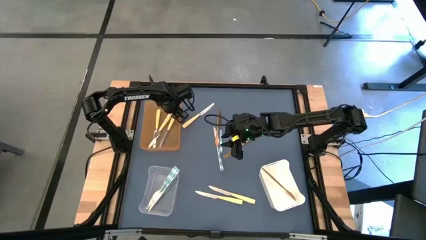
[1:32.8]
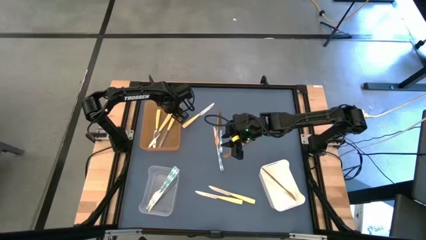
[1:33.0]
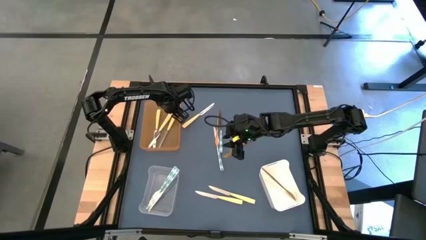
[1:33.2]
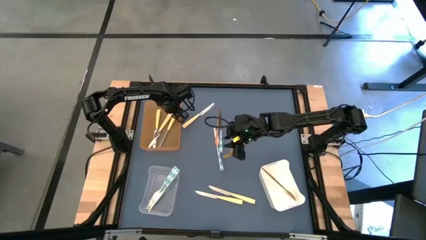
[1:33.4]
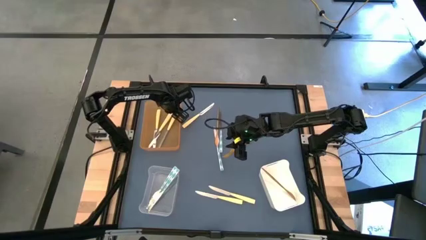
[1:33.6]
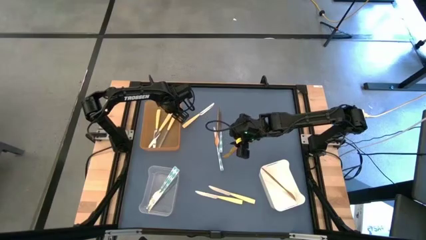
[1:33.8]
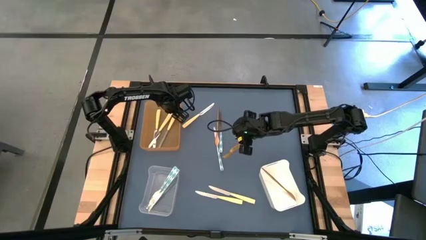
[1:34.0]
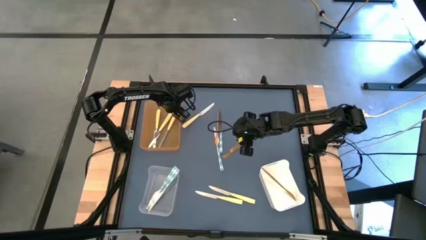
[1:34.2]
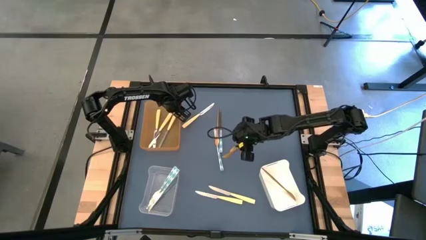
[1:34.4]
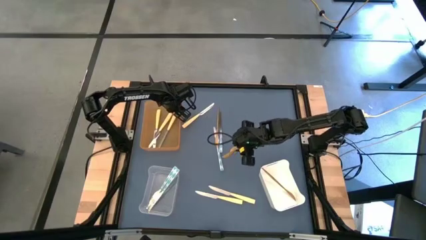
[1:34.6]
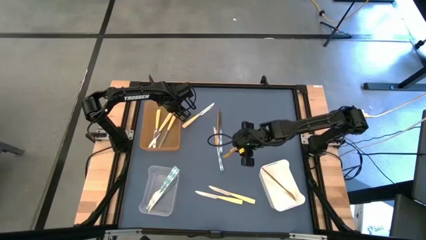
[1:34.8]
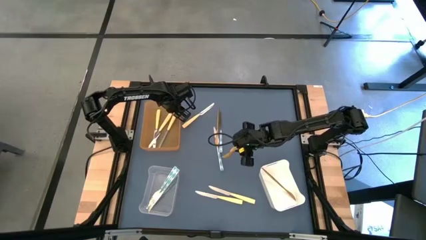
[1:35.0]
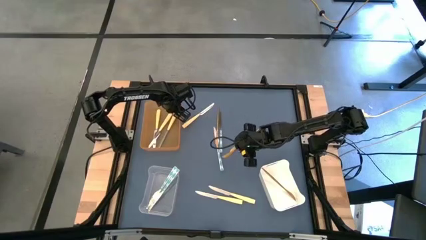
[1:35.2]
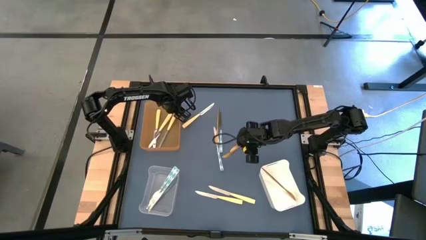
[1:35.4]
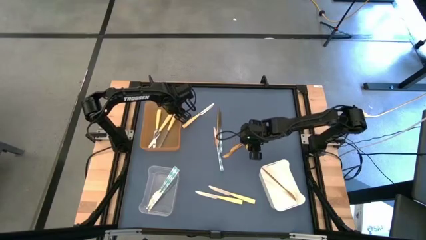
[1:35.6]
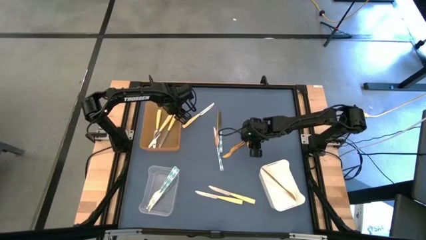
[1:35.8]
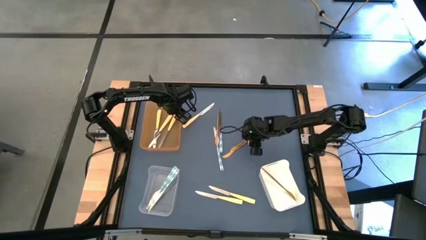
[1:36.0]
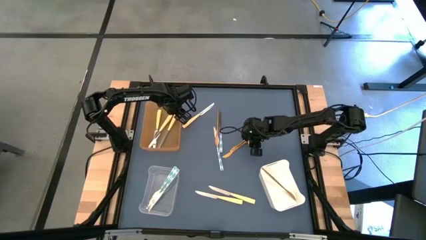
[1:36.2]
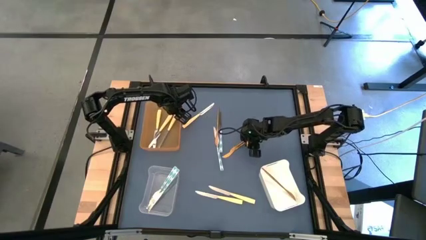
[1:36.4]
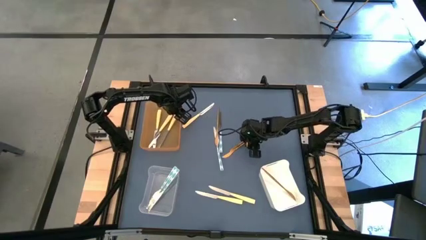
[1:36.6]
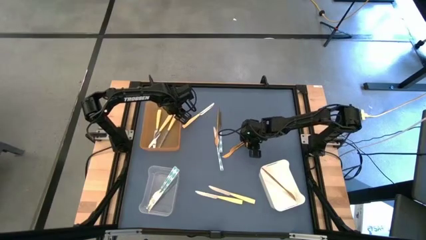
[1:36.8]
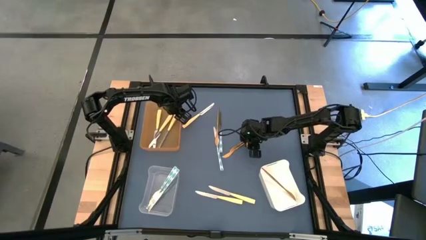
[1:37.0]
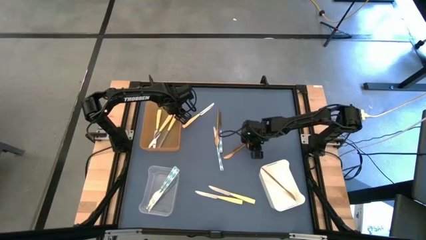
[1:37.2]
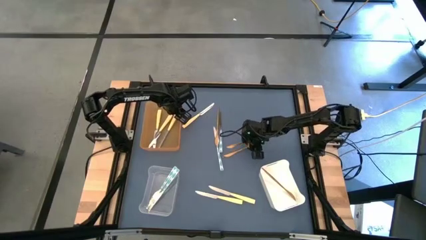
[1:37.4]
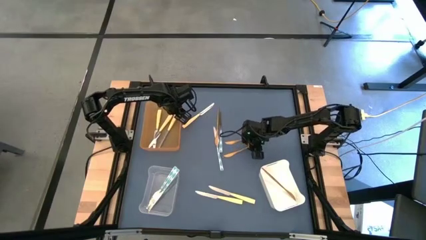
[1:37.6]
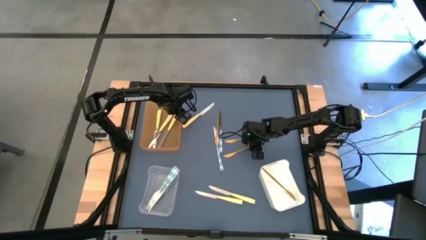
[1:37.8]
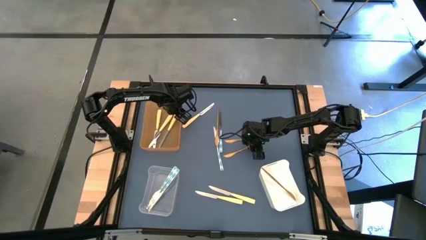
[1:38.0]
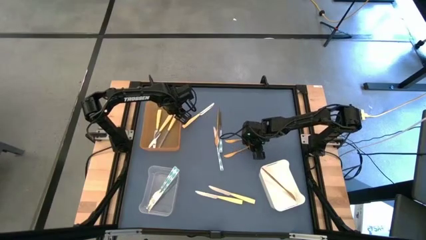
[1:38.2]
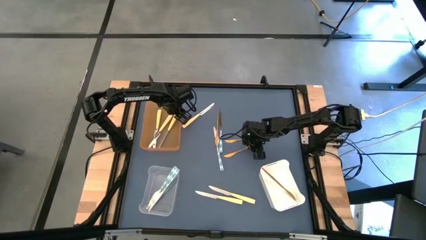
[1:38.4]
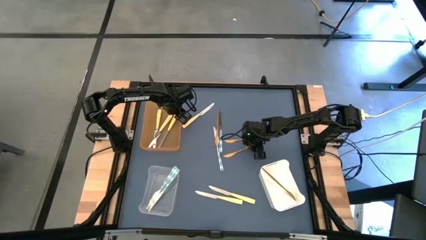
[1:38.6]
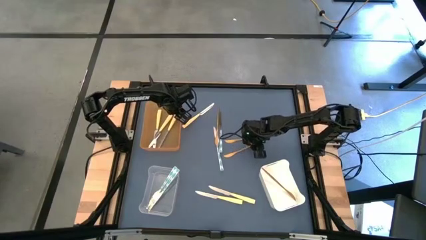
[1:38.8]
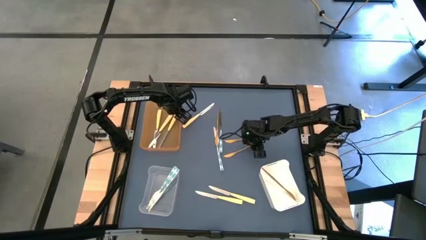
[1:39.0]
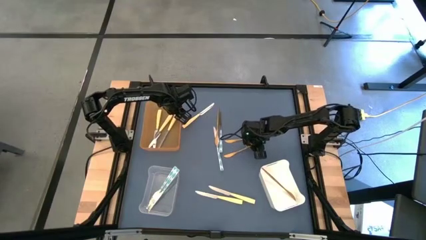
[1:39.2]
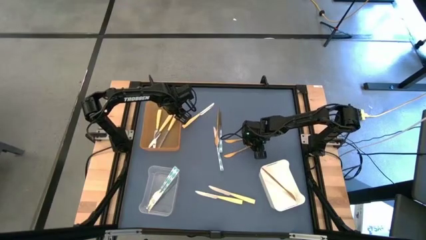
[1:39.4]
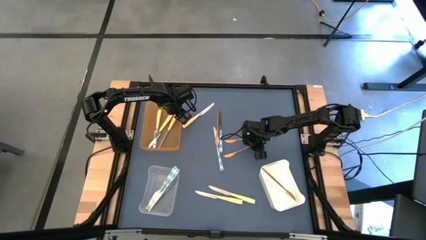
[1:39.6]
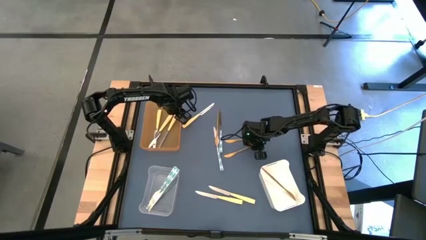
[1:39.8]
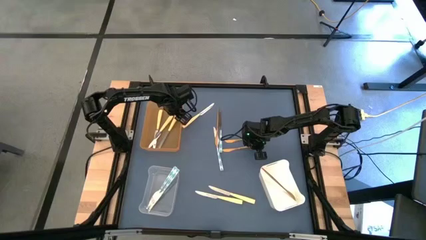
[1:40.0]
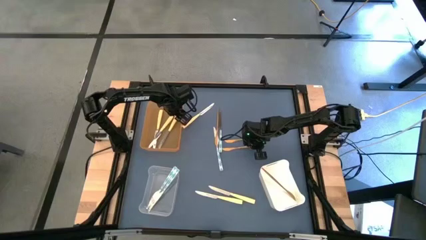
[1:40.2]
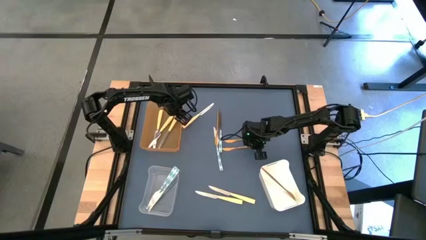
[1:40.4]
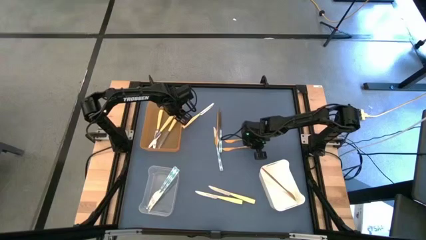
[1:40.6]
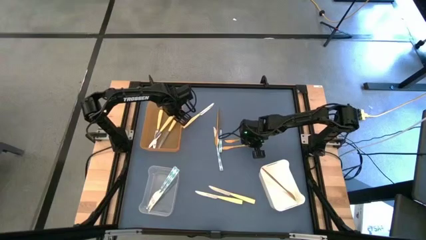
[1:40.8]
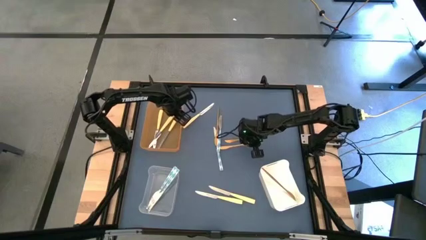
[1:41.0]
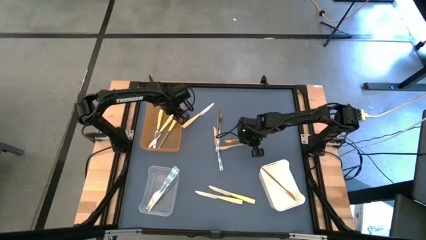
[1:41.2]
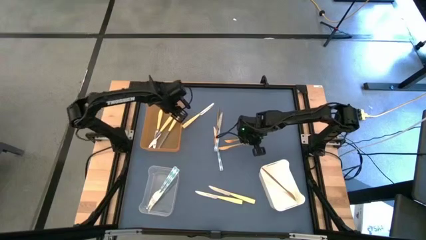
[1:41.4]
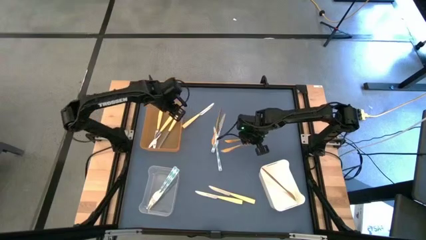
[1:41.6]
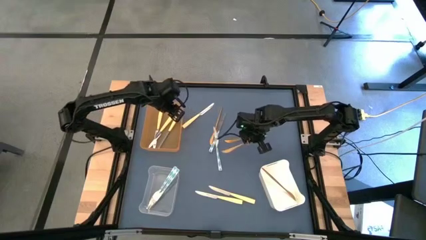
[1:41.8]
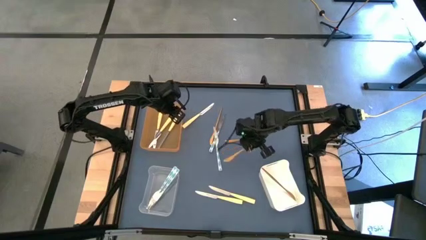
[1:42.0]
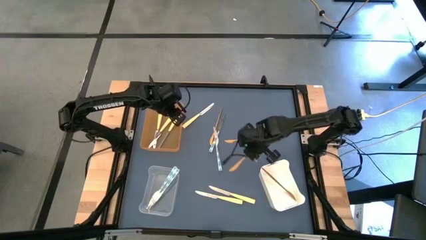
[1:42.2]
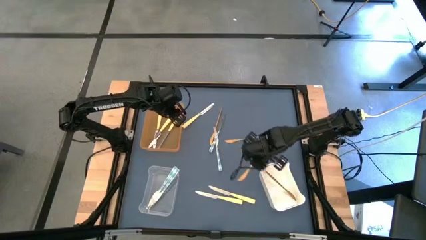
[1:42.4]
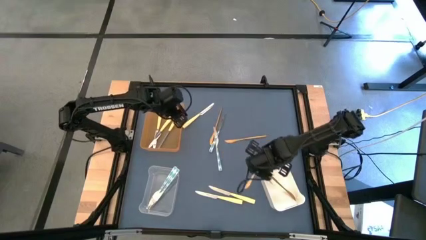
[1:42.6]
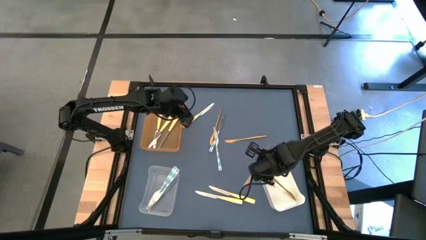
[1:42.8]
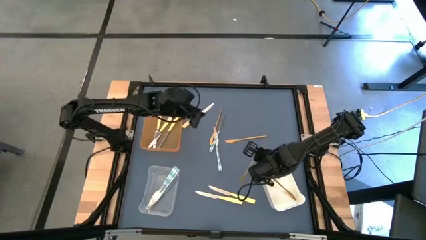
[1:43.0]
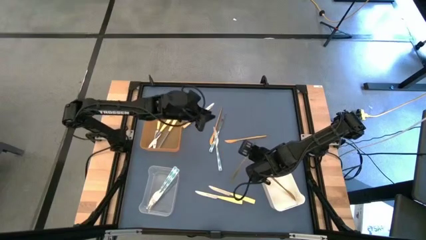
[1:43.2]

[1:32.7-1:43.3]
Task: Sort silverware by color (type)
Put the gold knife into the white bin

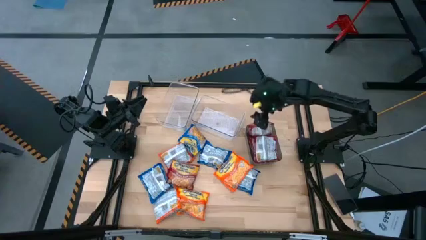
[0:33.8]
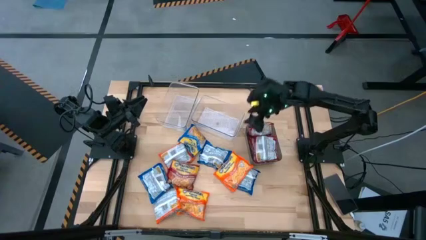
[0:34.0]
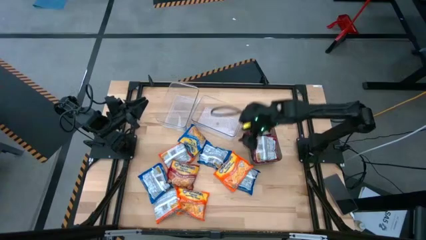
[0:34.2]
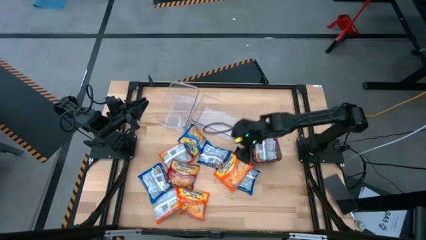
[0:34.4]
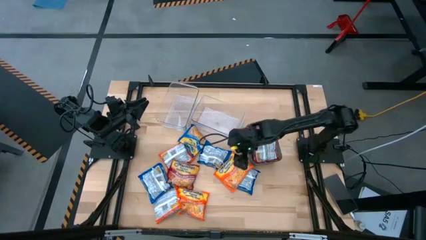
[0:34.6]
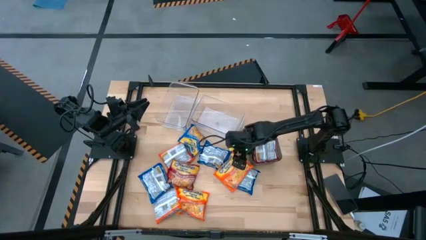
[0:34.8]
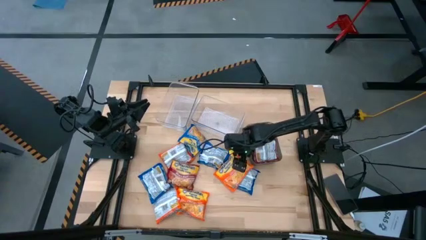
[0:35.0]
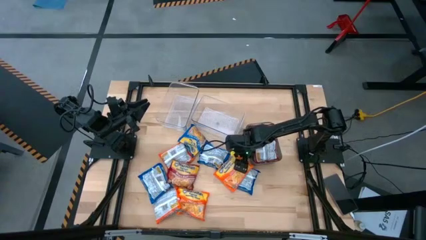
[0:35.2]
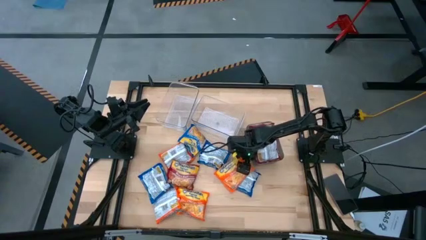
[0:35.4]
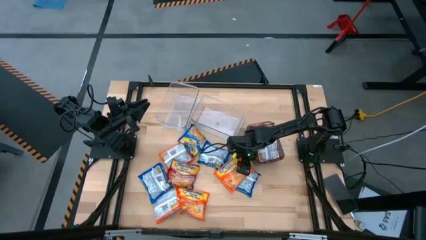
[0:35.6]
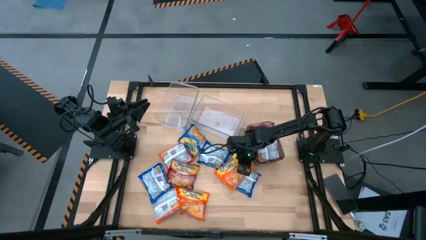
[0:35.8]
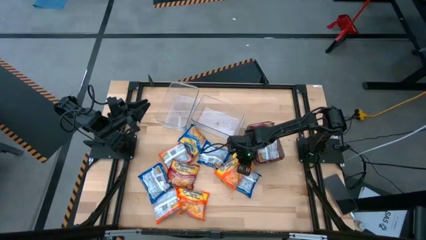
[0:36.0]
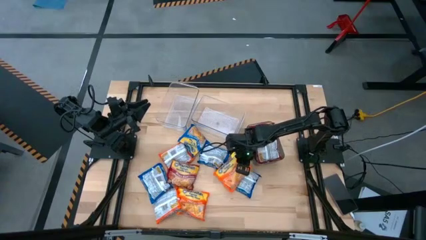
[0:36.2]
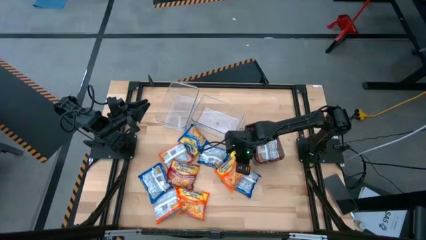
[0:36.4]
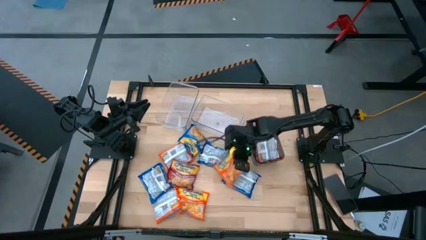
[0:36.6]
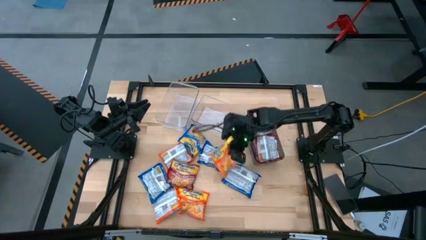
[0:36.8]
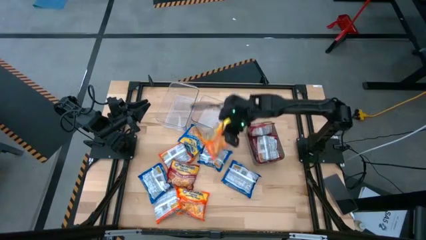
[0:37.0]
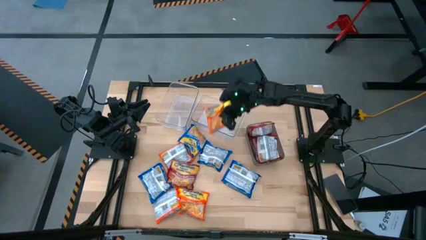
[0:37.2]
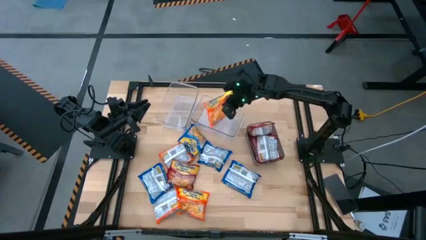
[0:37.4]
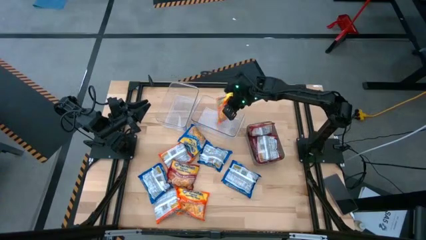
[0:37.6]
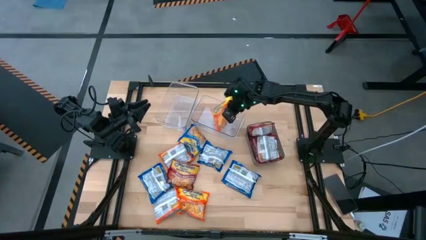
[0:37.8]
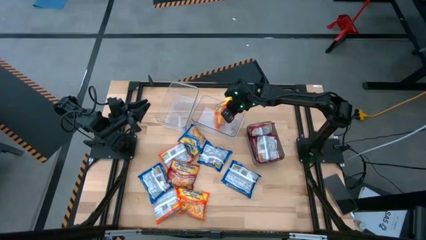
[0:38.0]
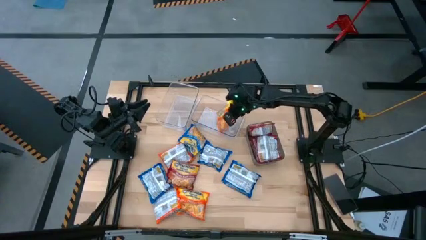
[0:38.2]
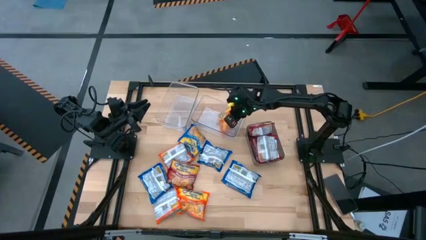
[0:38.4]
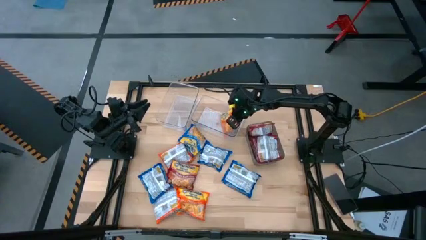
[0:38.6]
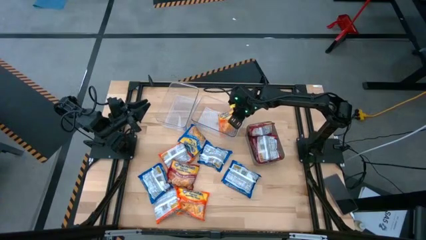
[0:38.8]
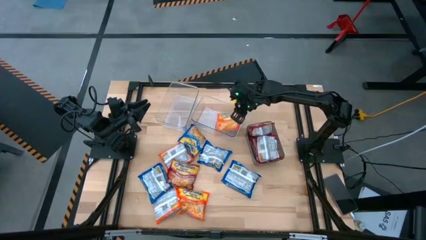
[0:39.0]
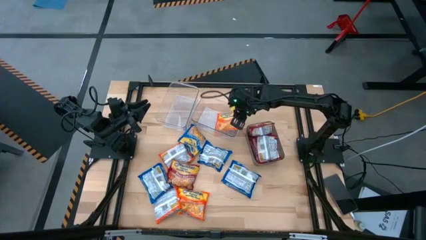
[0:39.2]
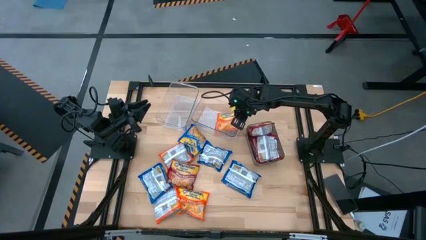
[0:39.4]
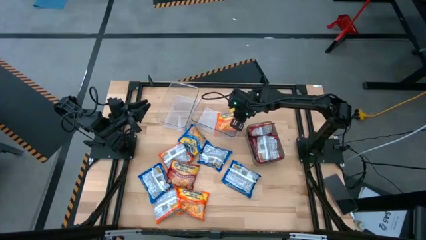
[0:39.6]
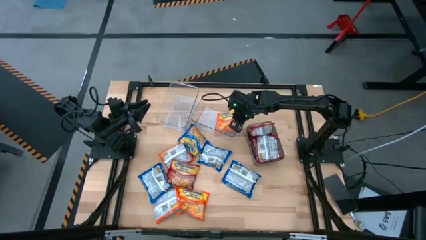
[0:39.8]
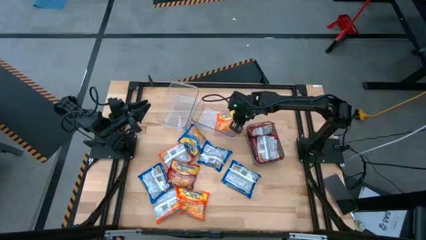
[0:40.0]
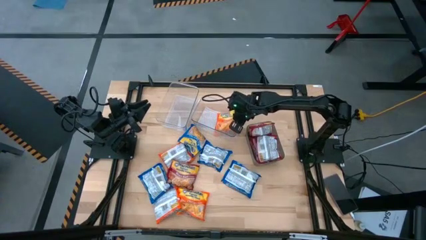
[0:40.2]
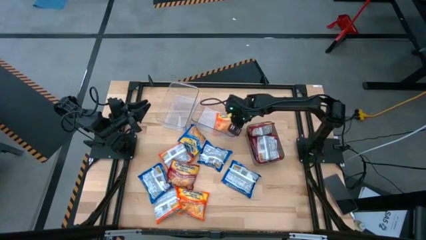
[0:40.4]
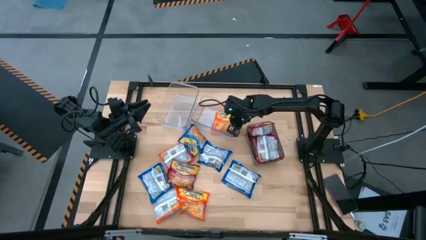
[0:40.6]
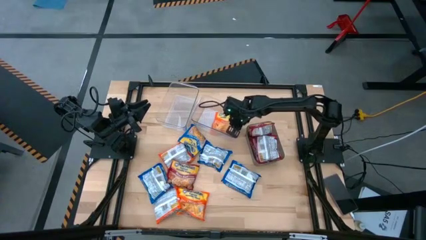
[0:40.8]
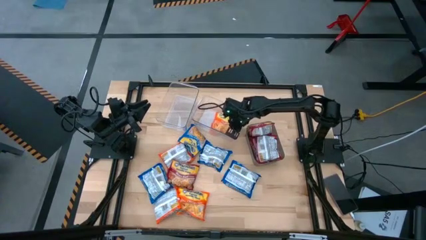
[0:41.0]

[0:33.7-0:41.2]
Task: Sort Maruchan noodles
Put the orange noodle pack into the right transparent bin
